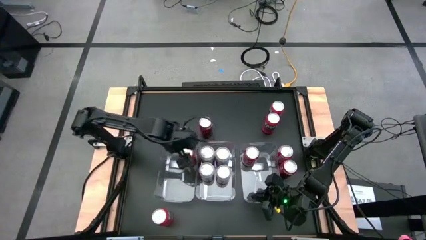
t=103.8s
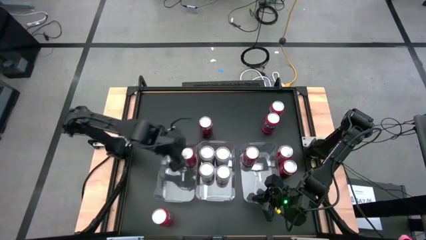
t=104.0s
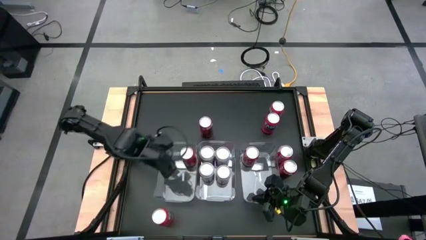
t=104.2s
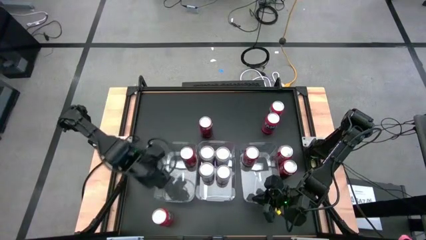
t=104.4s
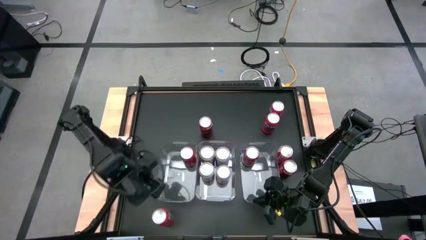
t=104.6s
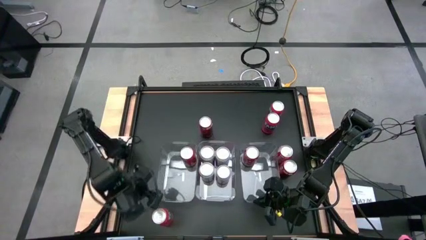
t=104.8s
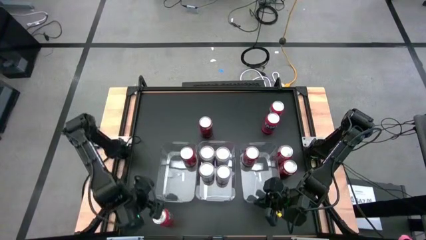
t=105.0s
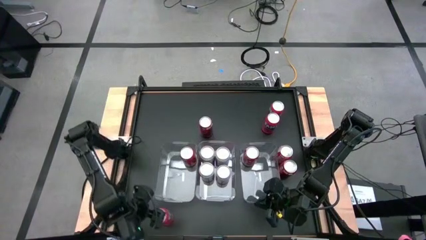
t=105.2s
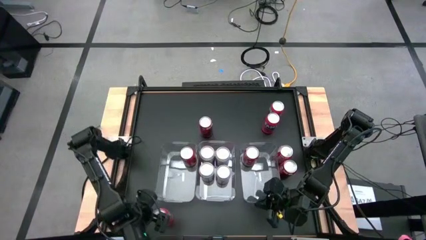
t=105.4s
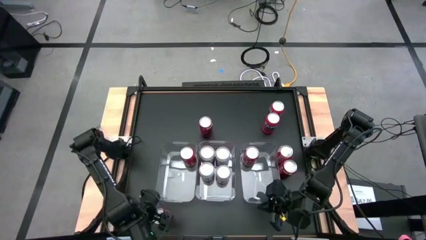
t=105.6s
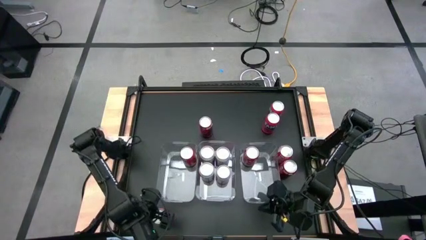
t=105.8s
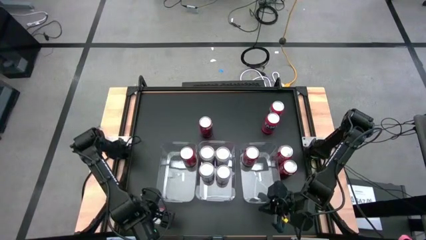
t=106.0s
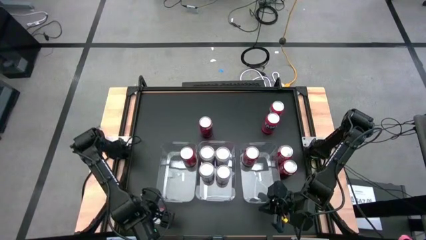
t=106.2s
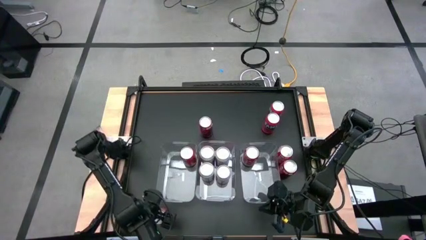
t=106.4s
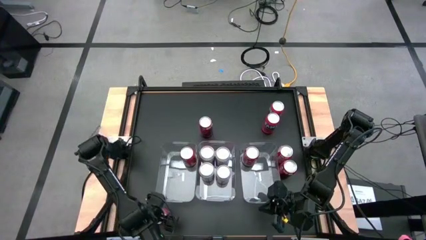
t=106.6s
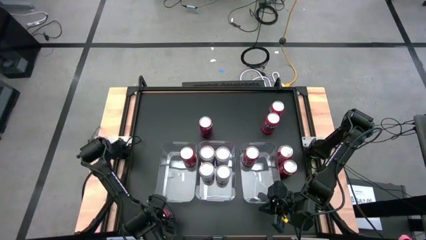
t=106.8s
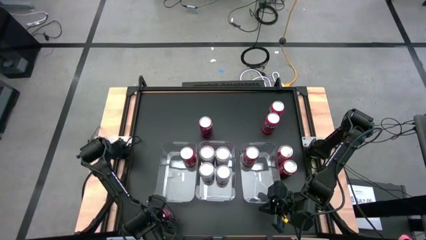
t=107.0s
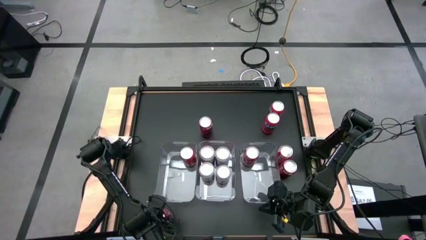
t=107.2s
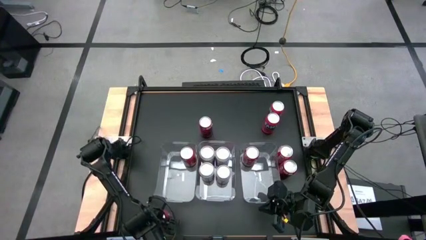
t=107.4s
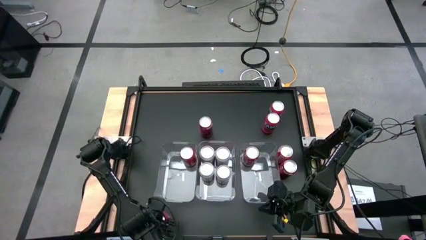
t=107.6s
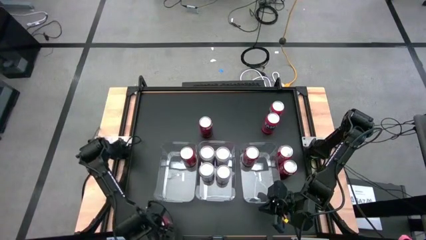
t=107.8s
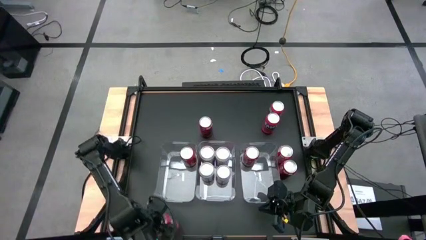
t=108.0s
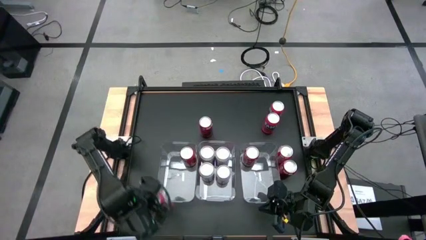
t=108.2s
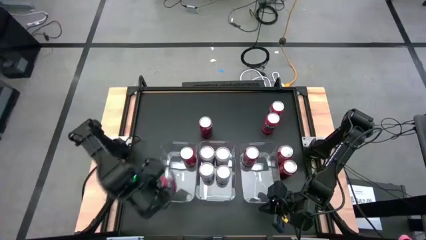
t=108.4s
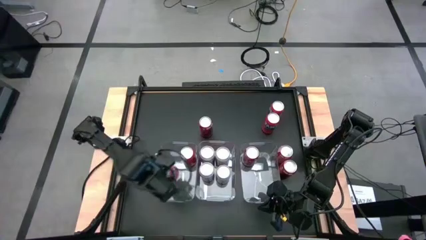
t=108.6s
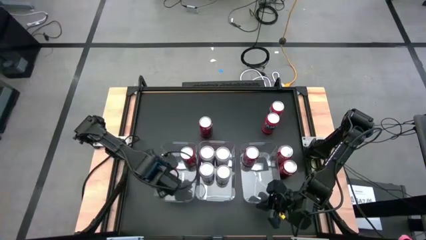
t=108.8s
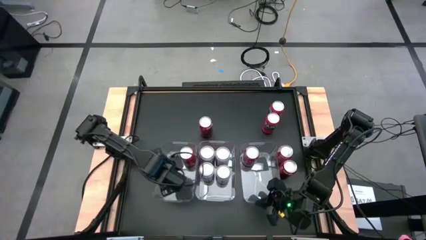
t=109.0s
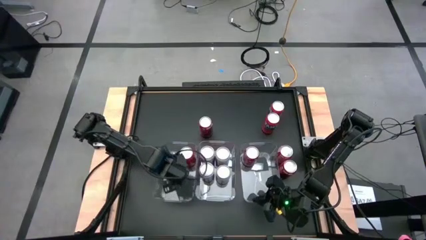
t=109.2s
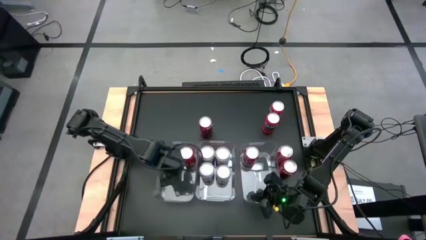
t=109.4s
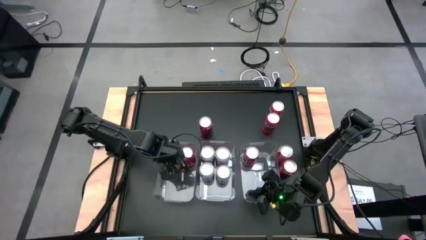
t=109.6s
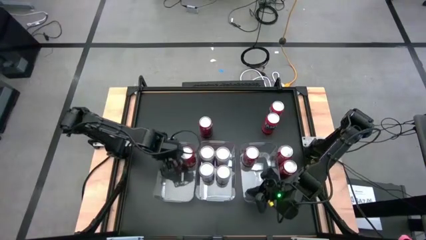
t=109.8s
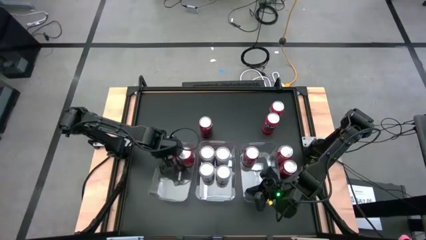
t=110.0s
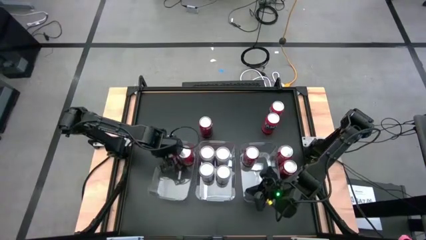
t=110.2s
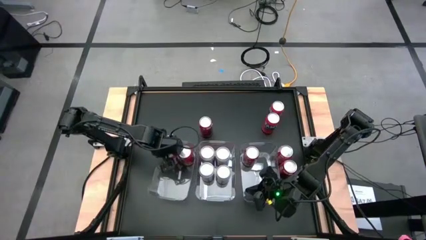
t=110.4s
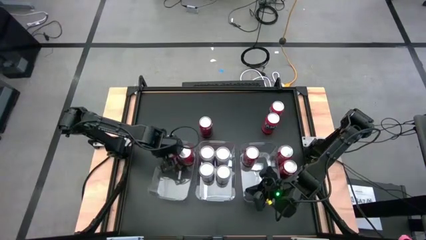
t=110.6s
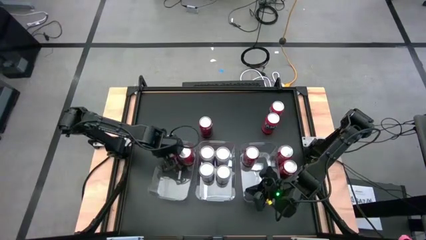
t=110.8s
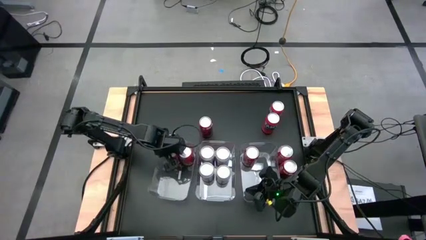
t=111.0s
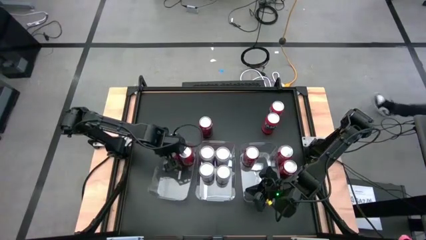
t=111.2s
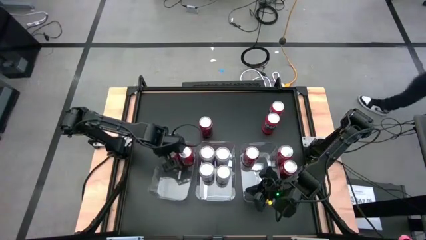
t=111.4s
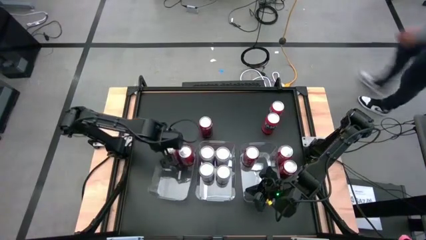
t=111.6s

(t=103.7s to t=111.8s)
Task: Sort soda cans
Put the orange soda can into the left transparent bin

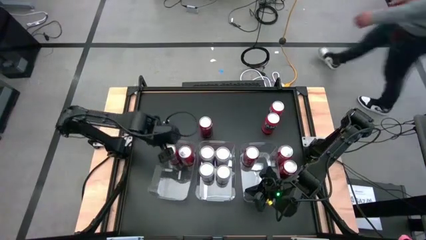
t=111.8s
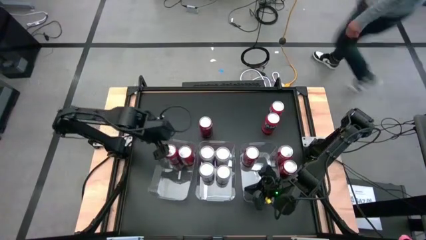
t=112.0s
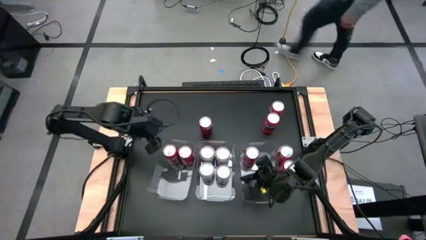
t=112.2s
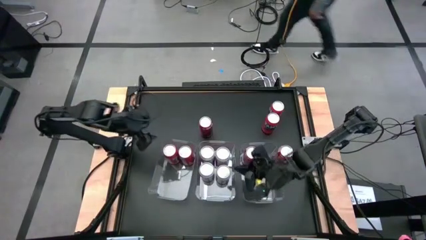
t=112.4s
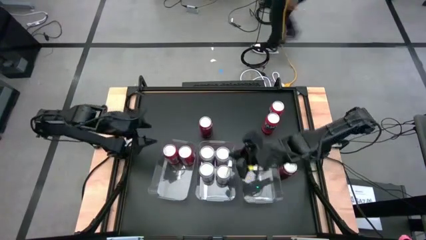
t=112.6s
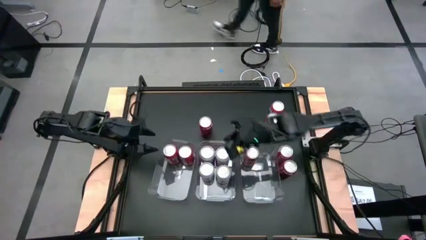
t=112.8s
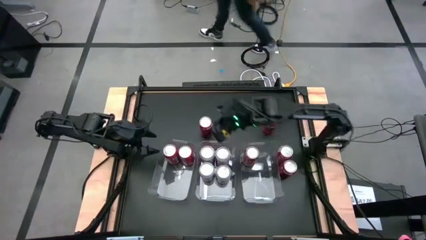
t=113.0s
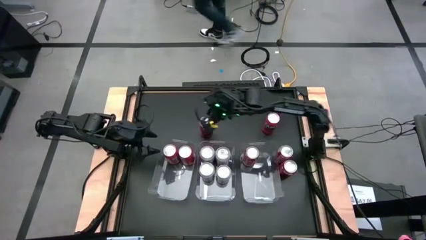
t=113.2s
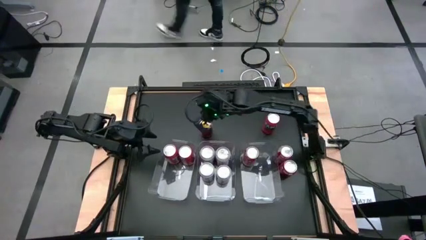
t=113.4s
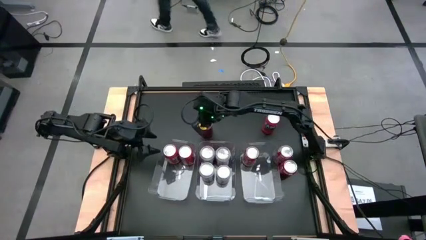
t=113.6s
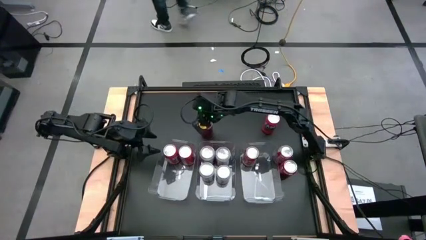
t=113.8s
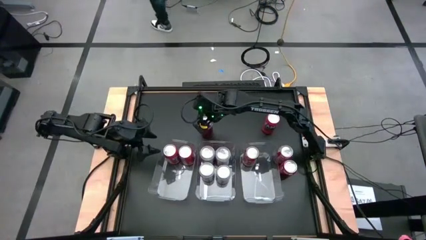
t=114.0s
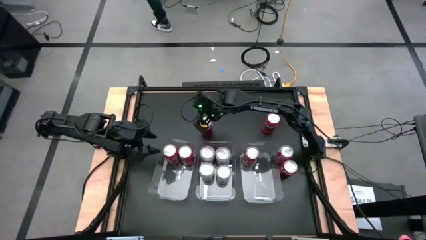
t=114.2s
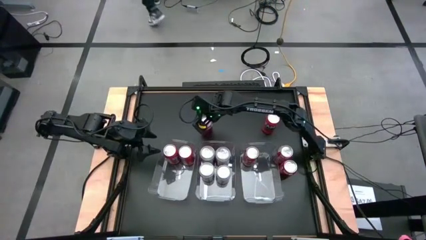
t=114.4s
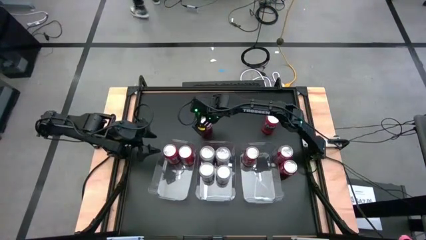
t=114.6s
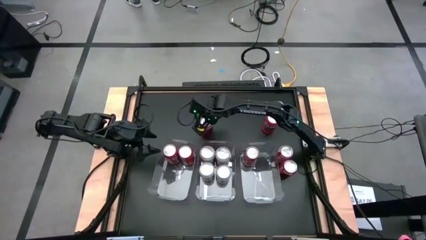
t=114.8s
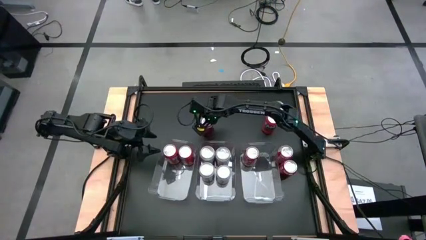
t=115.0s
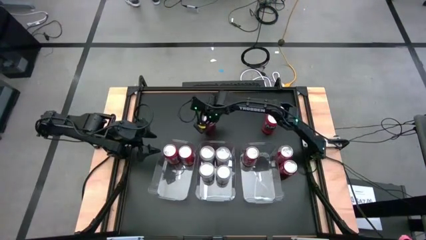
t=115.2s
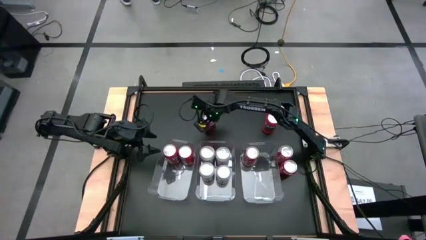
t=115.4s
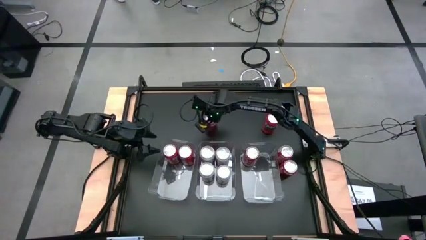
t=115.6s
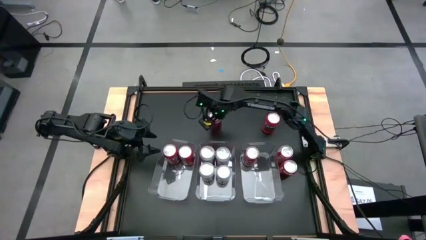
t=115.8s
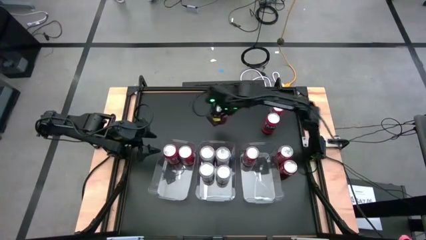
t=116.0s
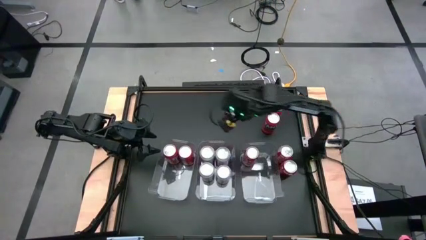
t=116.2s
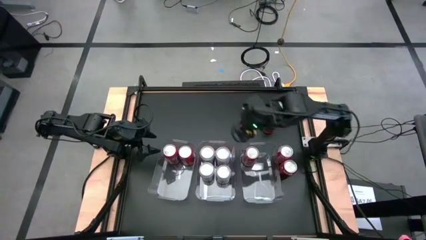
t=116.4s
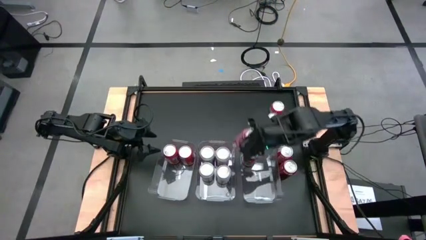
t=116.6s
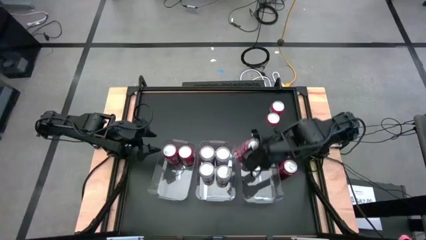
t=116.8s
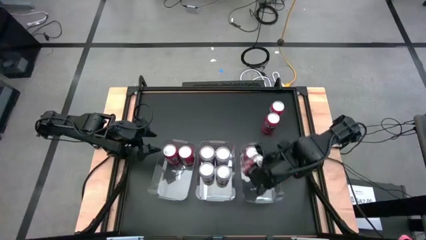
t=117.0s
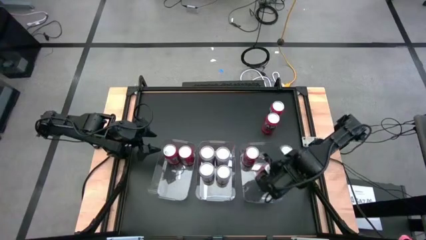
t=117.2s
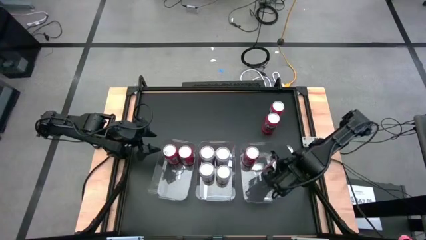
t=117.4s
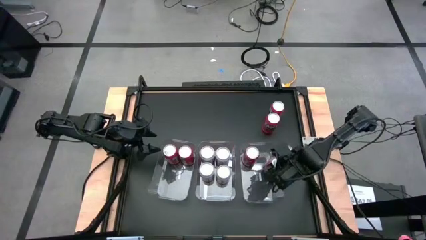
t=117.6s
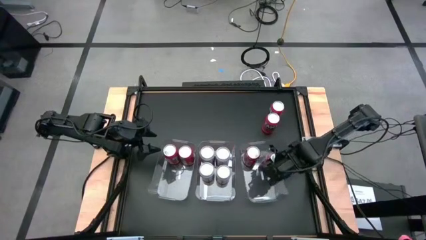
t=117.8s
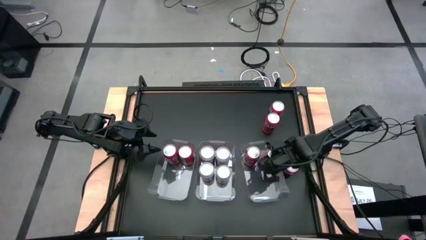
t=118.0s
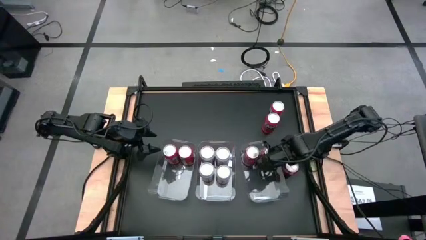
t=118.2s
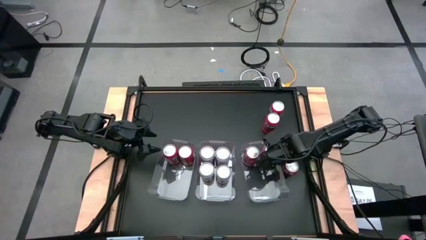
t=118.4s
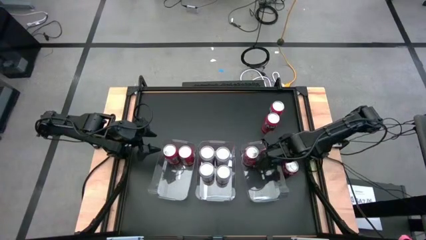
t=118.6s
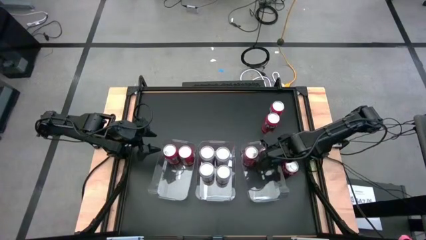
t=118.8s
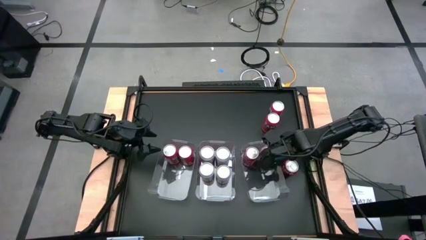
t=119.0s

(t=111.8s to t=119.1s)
Put the red soda can into the right transparent bin

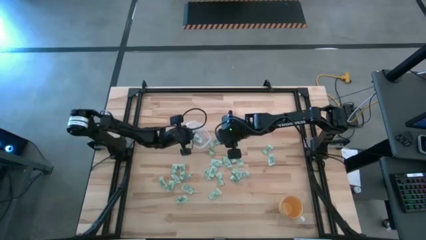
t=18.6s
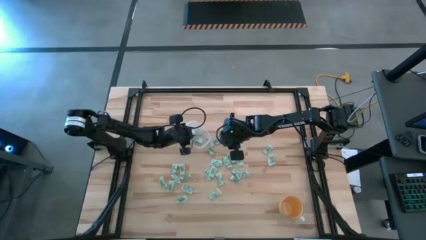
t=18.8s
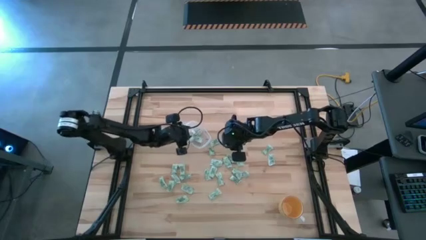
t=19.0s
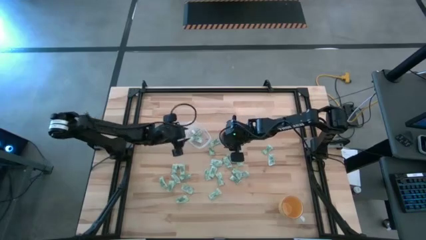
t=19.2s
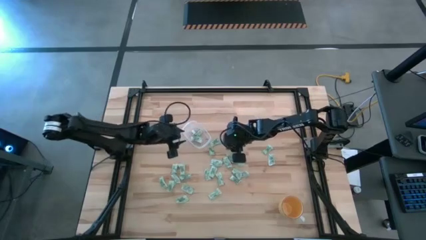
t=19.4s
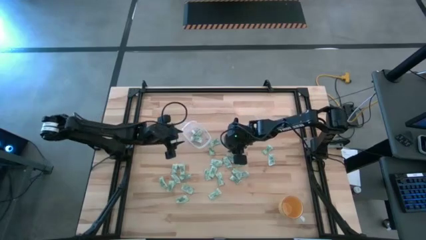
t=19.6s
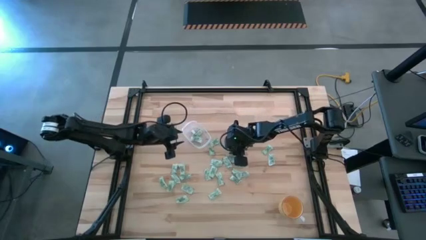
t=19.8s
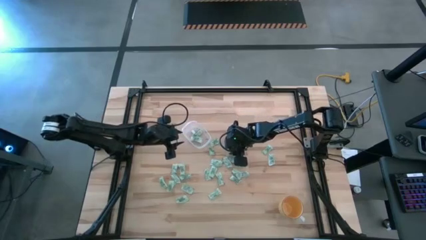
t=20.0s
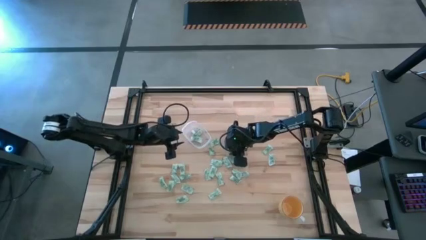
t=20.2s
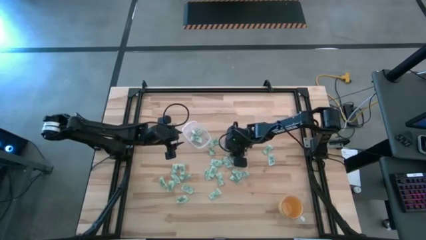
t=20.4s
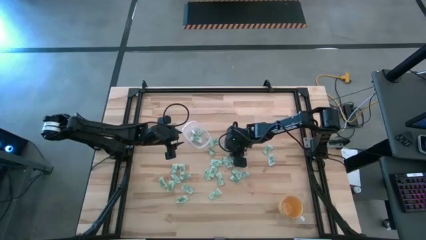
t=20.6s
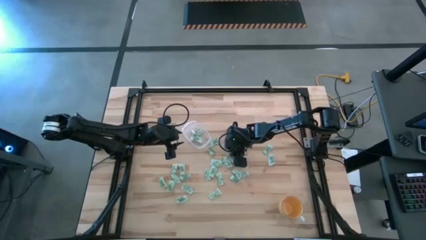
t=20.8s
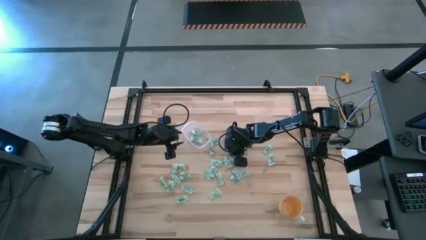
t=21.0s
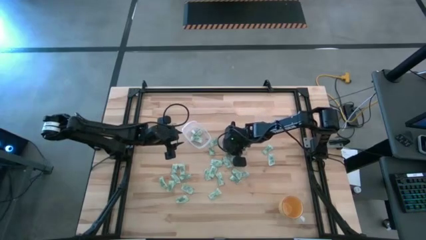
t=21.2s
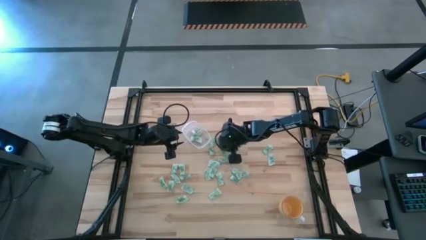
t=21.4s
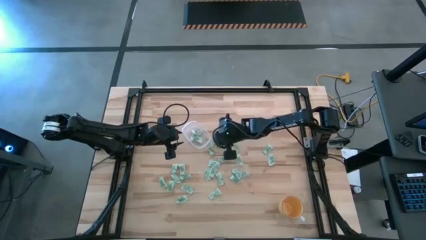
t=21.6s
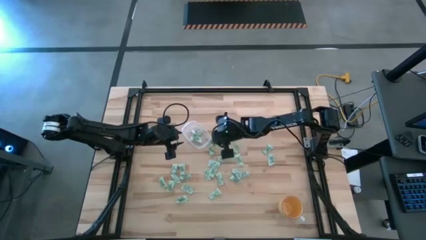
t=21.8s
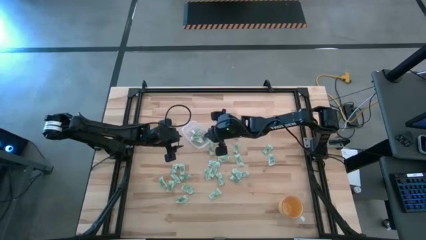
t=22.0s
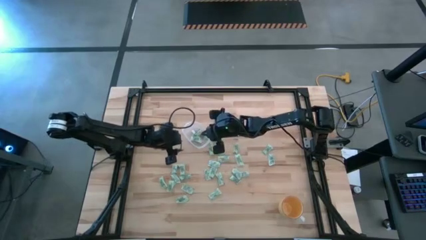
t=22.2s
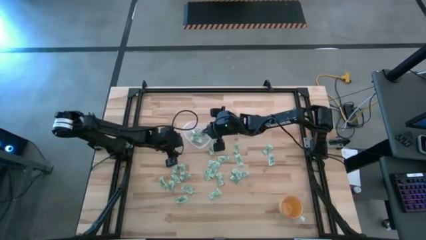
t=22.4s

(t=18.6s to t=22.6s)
Task: Pick and place Stevia / Truvia into bins
Put the stevia packet into the transparent bin
